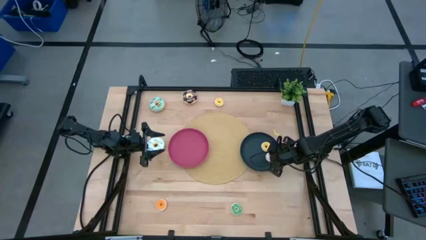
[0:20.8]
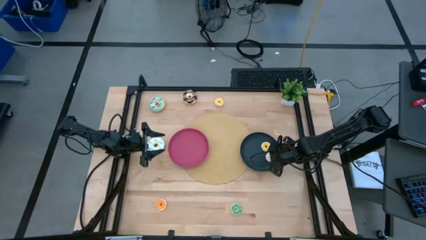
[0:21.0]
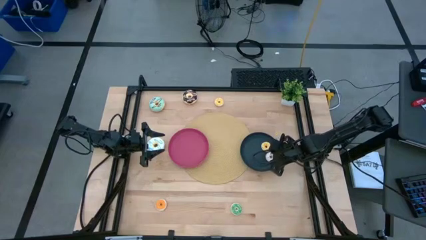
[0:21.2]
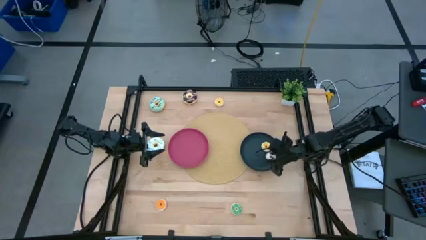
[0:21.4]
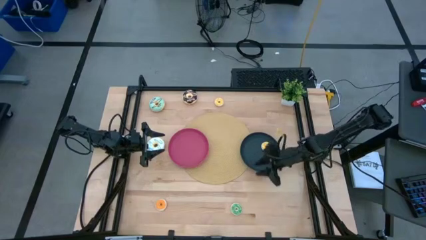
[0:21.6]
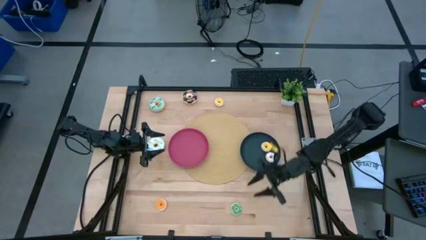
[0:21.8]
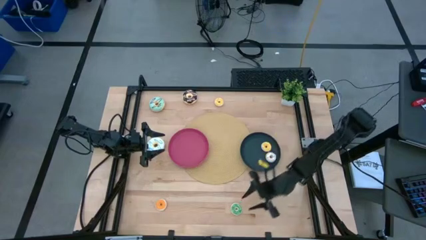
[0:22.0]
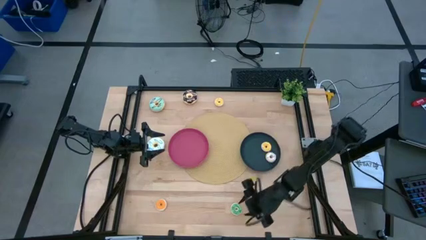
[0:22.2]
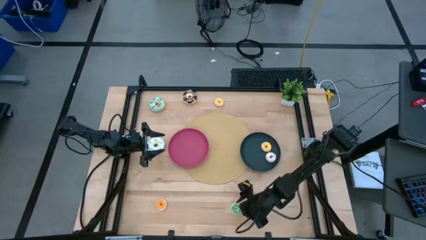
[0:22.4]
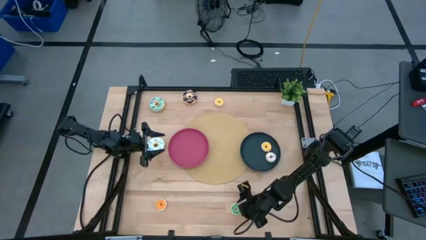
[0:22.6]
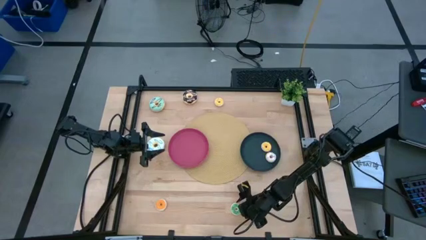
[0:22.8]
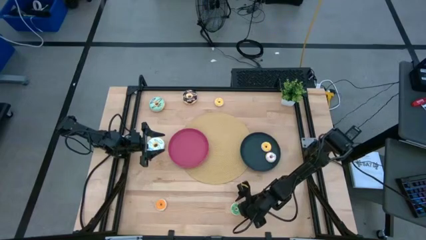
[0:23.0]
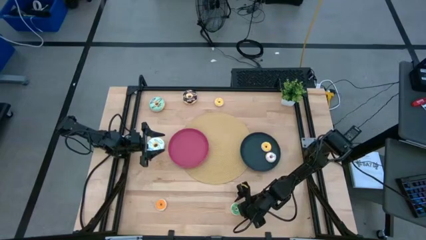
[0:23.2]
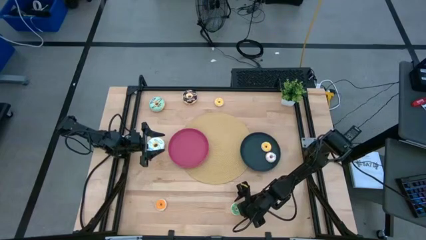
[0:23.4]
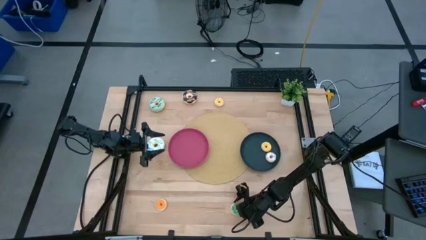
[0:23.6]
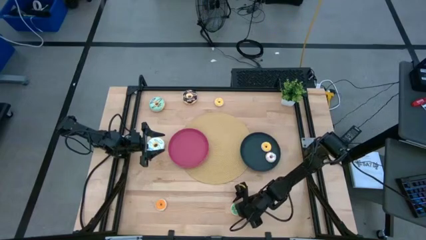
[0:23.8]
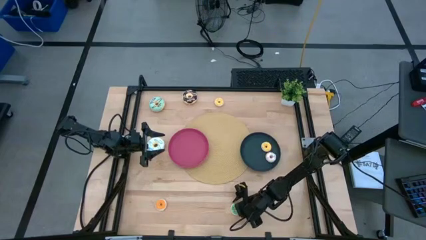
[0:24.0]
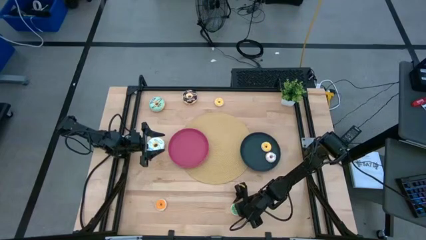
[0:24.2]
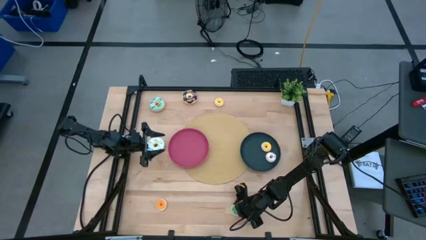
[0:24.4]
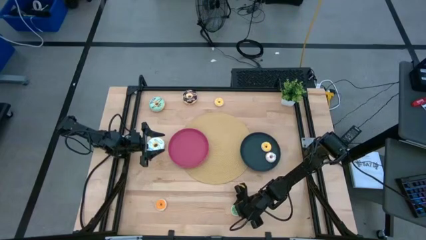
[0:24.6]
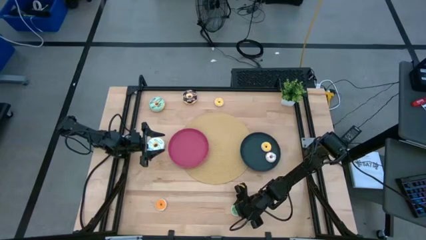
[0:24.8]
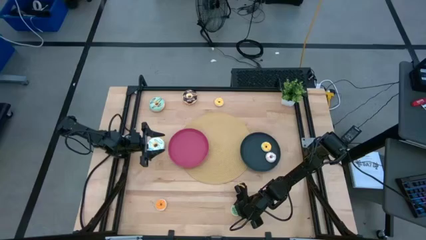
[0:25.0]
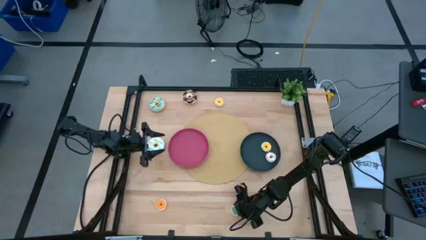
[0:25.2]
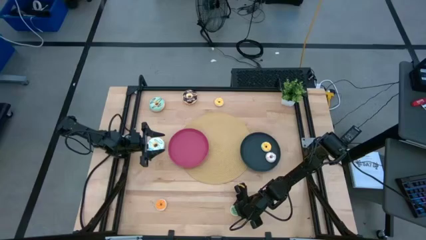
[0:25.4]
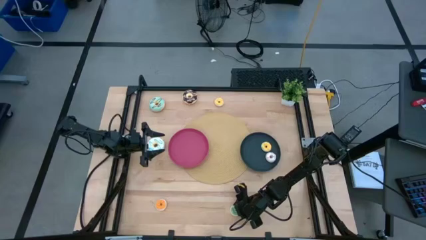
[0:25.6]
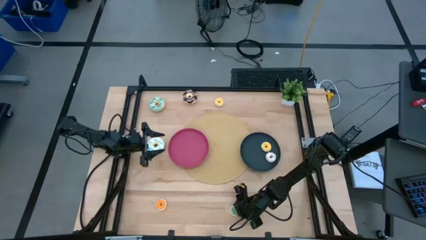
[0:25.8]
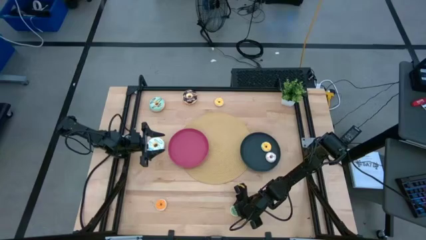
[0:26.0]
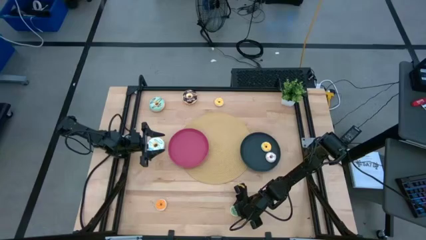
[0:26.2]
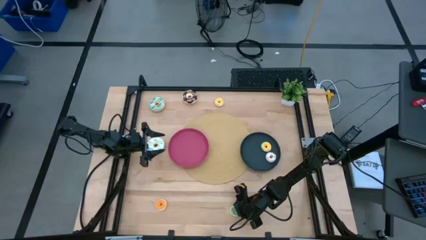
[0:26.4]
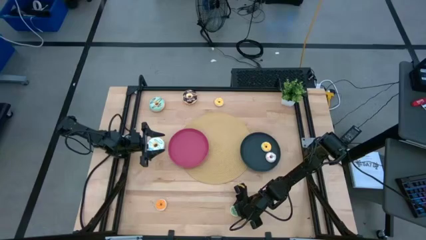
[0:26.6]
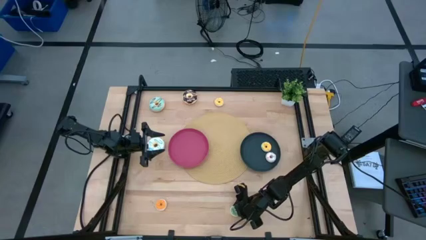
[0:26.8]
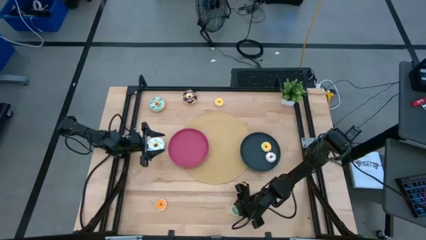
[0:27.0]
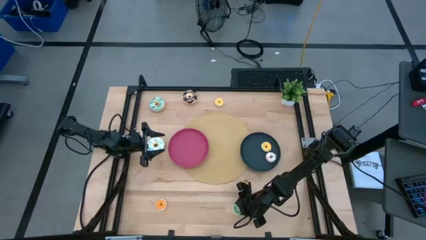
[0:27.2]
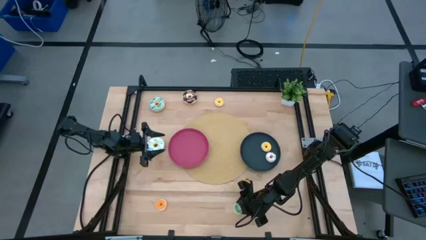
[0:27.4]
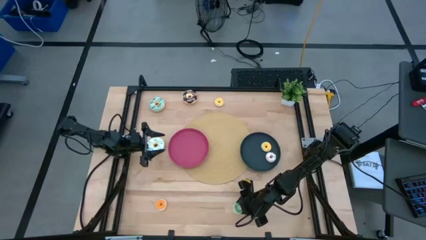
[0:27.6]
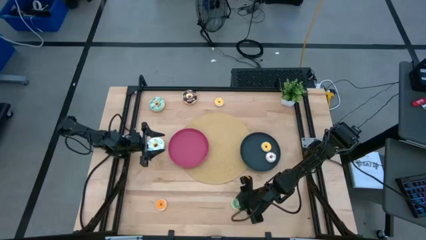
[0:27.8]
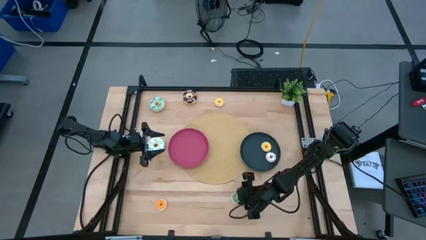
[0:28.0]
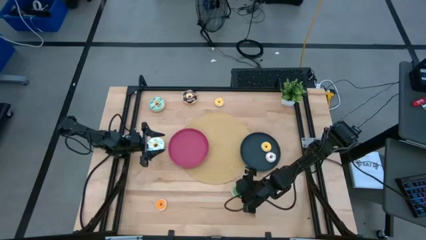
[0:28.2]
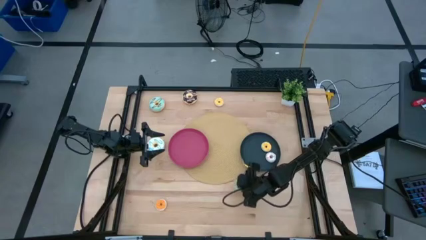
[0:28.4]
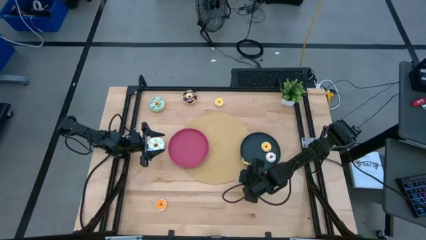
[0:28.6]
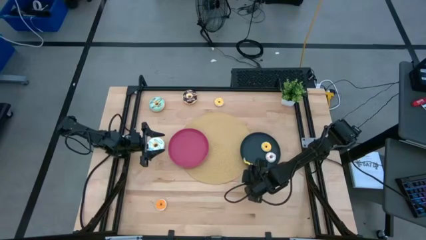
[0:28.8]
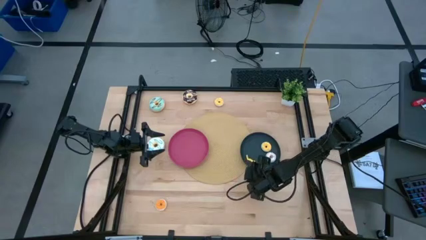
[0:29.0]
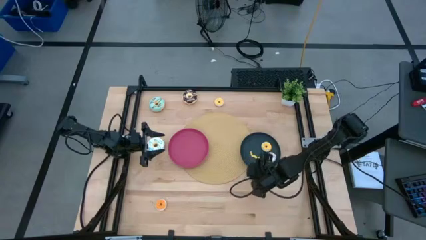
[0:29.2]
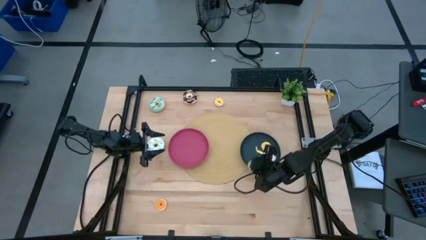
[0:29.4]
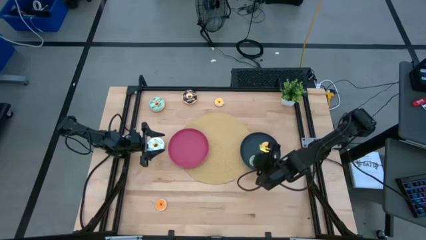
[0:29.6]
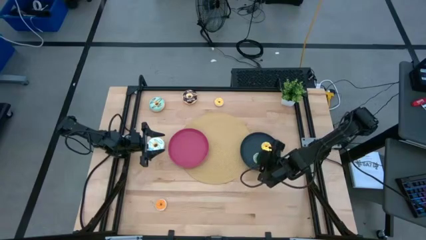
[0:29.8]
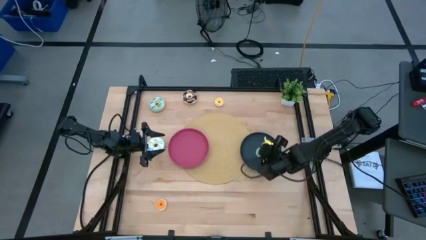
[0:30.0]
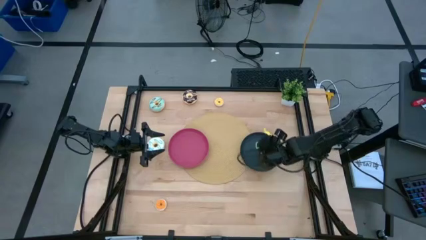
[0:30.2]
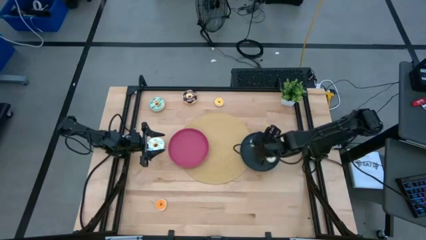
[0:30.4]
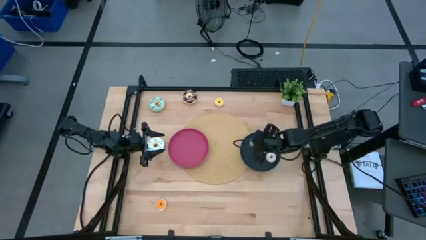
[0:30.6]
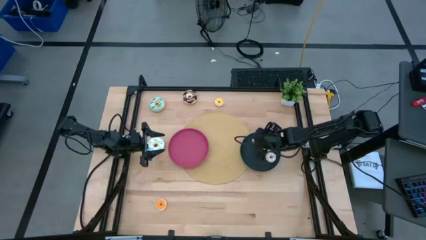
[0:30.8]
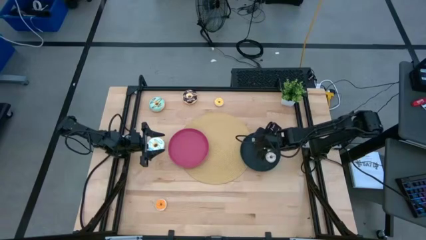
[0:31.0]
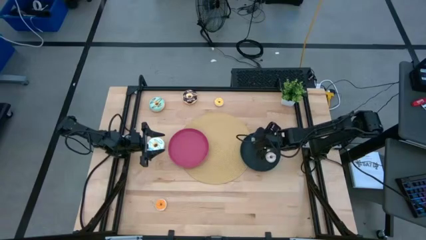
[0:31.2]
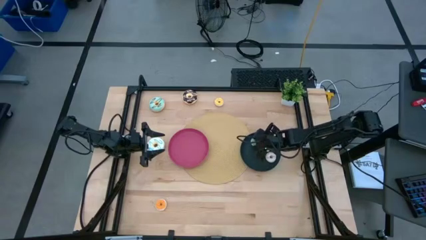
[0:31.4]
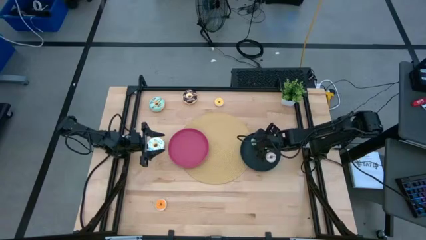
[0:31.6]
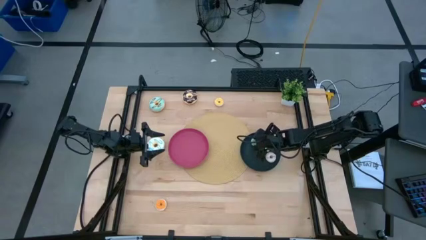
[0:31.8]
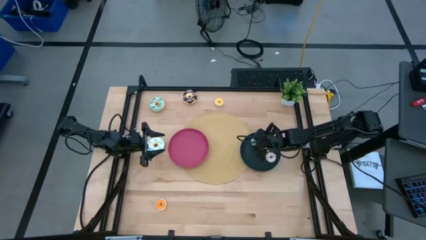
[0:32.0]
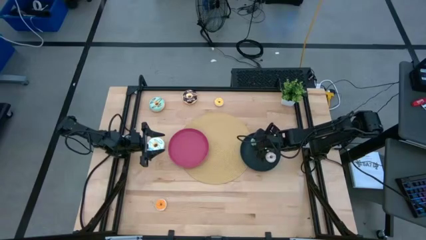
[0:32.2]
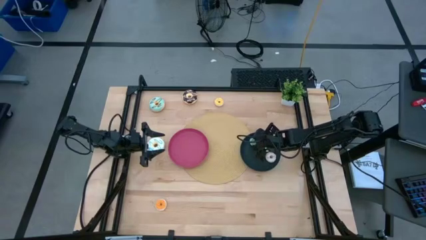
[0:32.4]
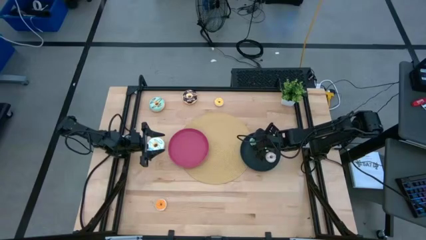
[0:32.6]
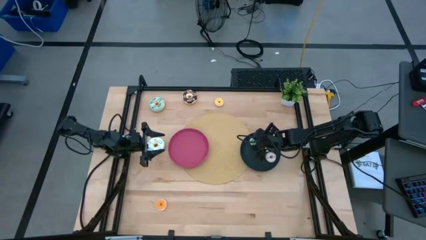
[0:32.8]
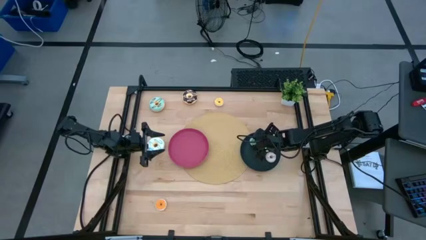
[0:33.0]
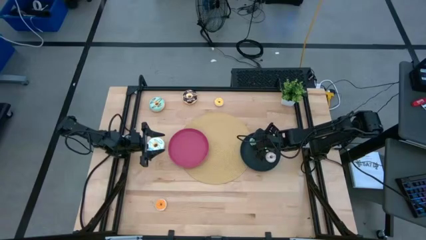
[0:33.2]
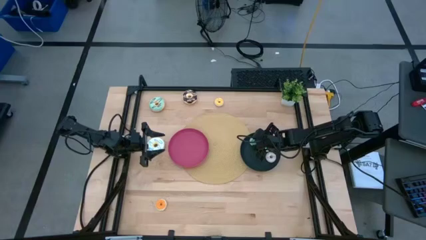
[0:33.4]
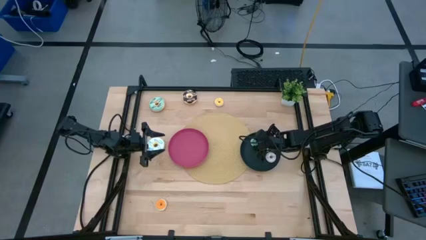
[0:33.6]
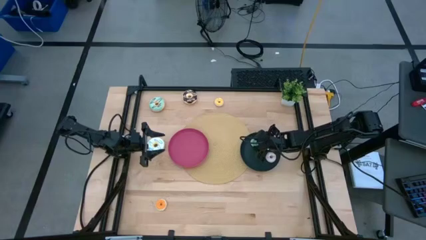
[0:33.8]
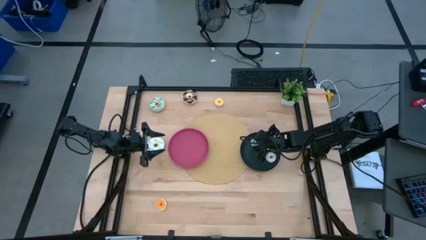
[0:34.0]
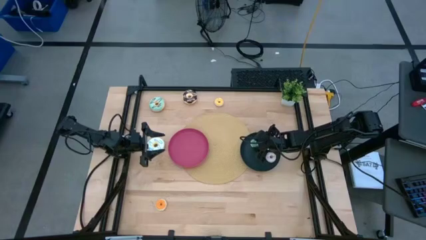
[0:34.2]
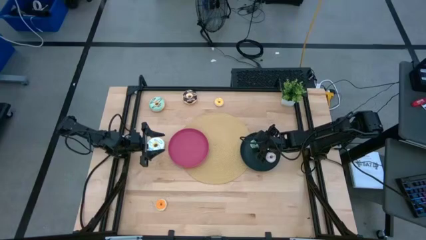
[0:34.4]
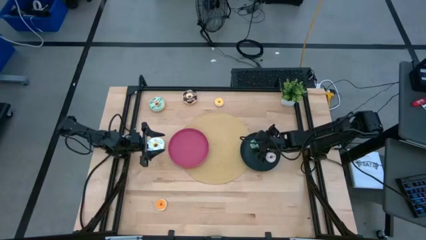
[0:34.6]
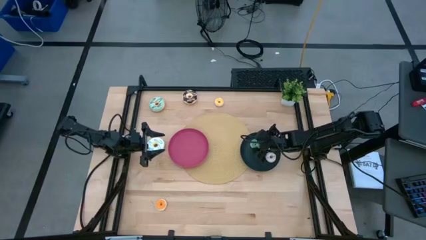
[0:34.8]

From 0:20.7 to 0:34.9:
Task: Pick & Place donuts
Put the small green donut on the black plate
